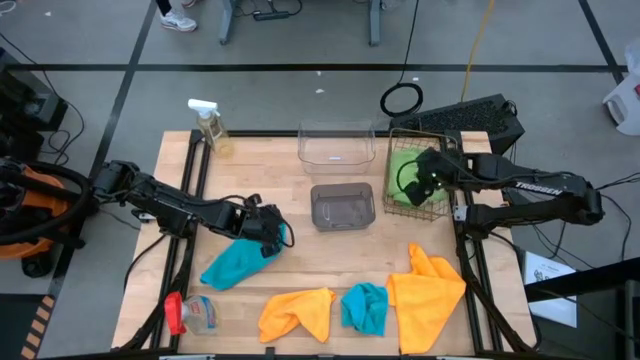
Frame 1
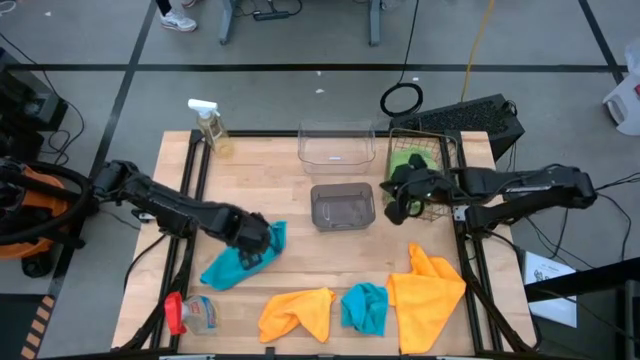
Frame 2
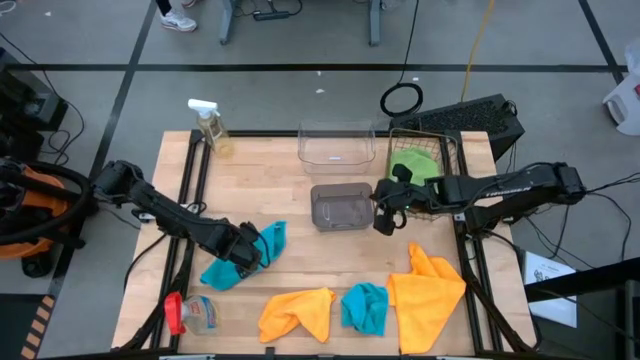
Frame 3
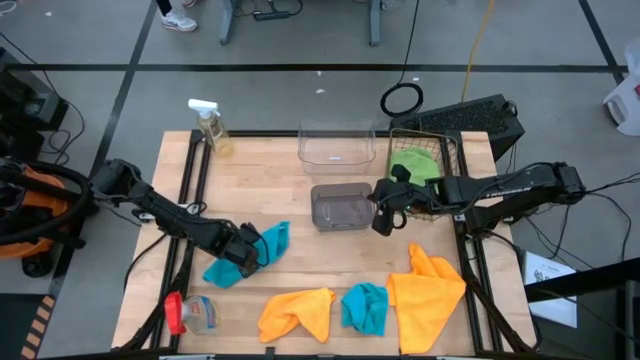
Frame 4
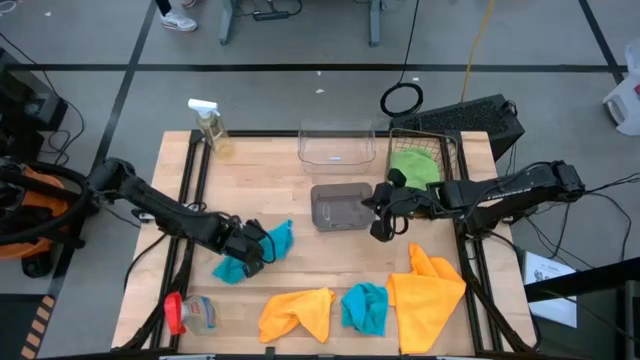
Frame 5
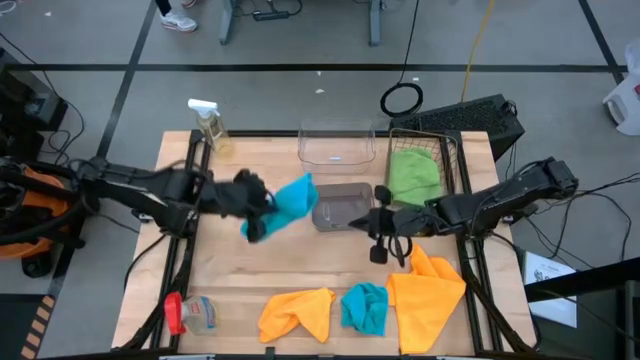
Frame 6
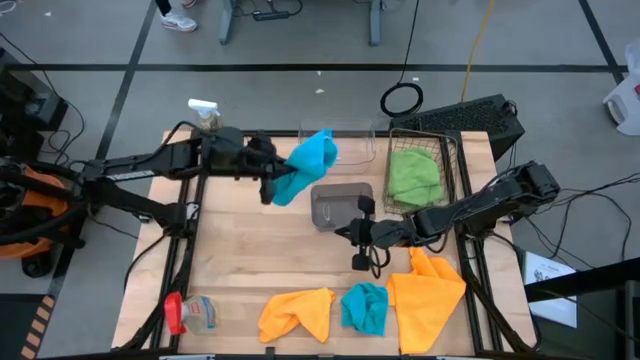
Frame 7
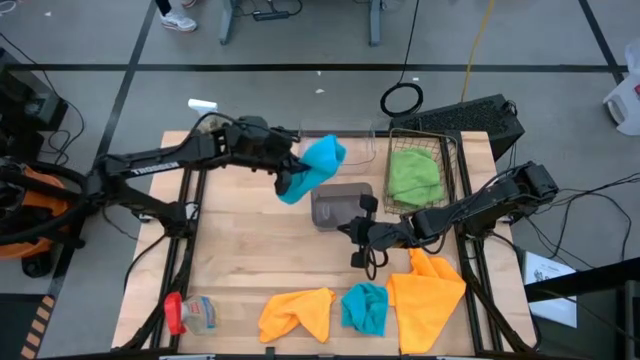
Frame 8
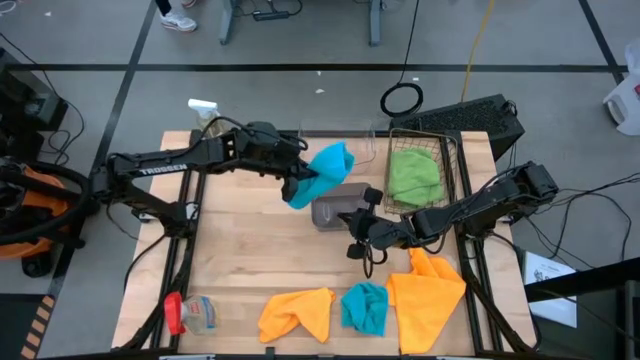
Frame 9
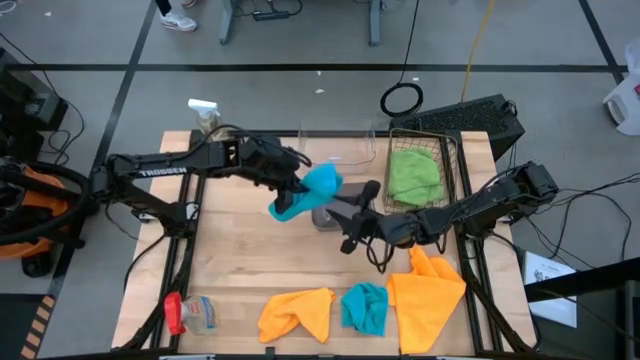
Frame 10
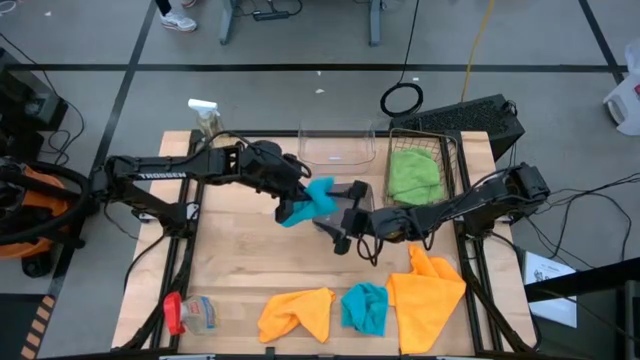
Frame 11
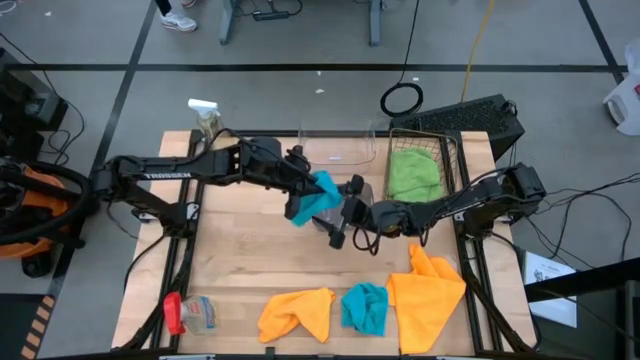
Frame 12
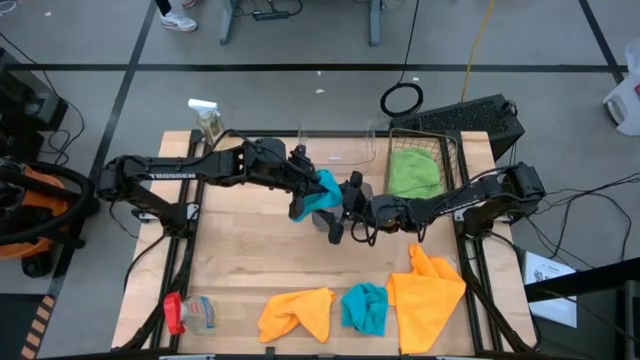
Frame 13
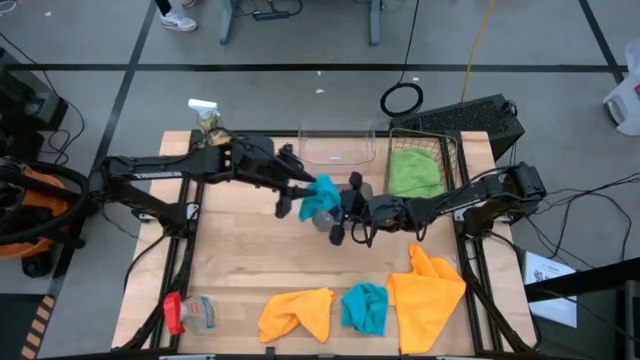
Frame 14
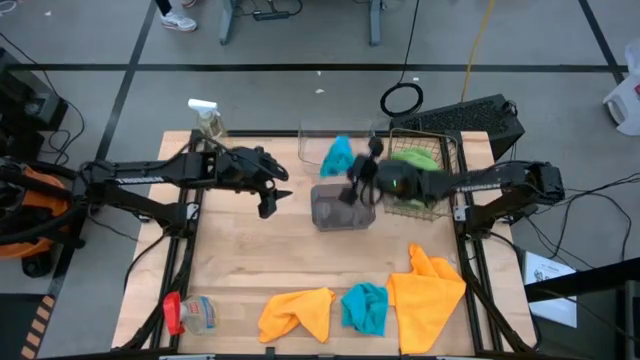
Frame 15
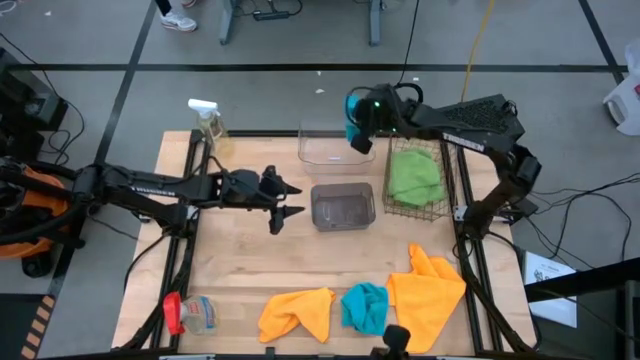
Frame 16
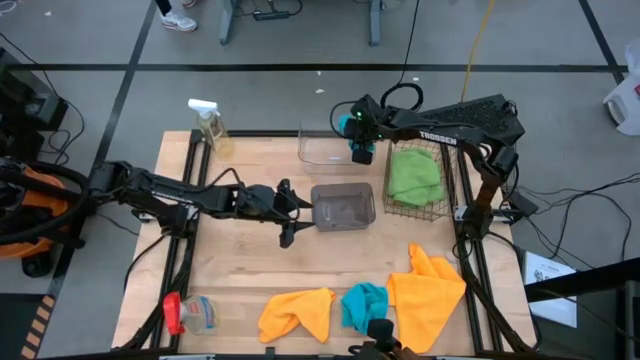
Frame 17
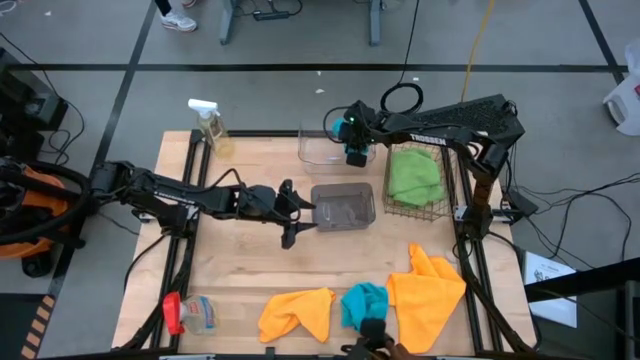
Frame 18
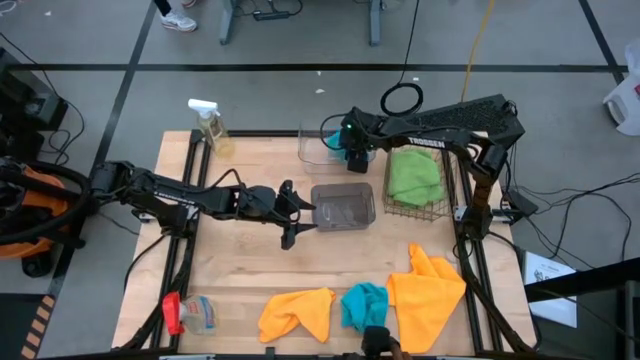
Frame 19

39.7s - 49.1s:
Task: Sort microfiber towel by color & place in baskets
Put the left blue microfiber towel into the transparent bin

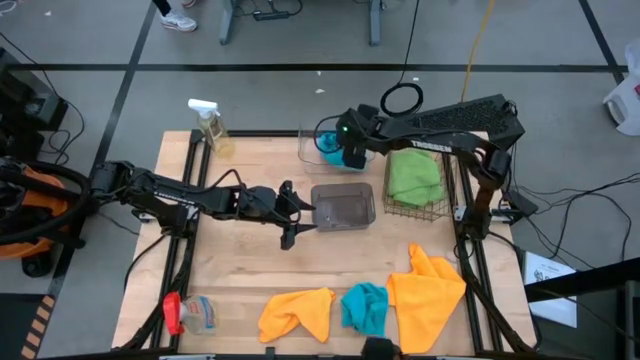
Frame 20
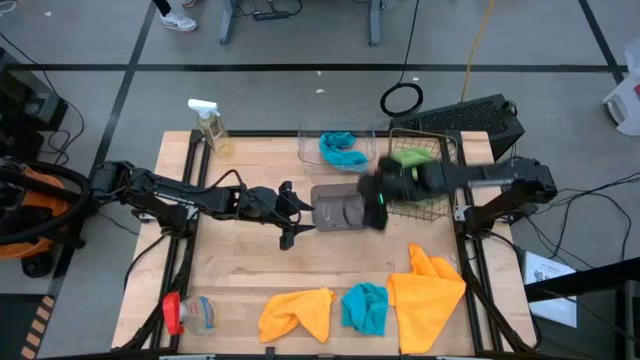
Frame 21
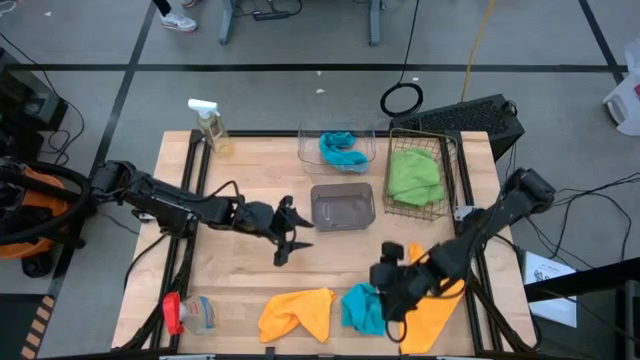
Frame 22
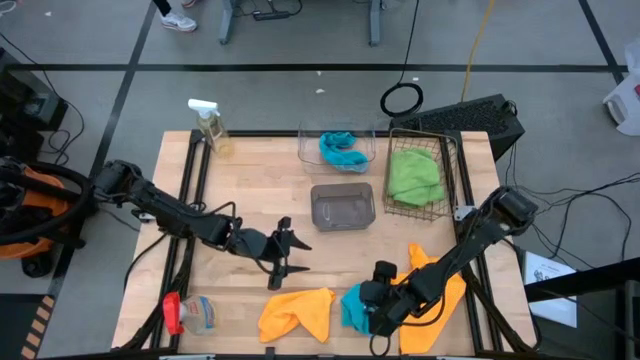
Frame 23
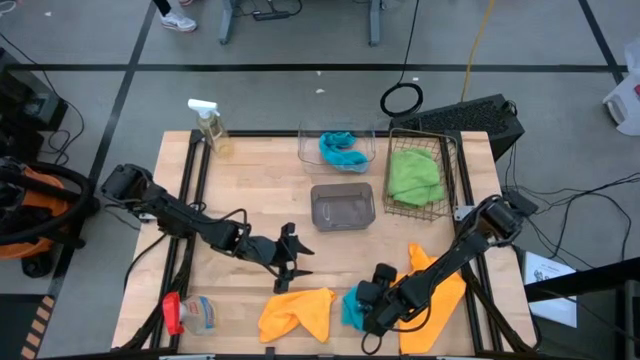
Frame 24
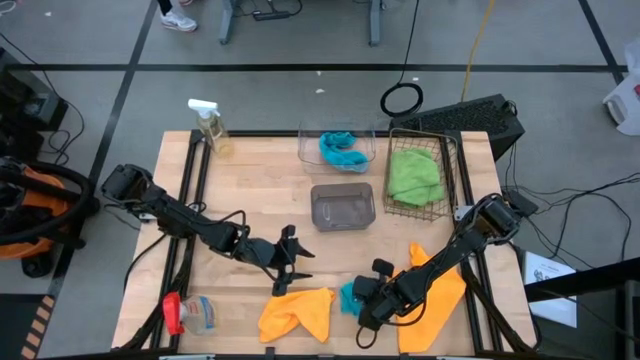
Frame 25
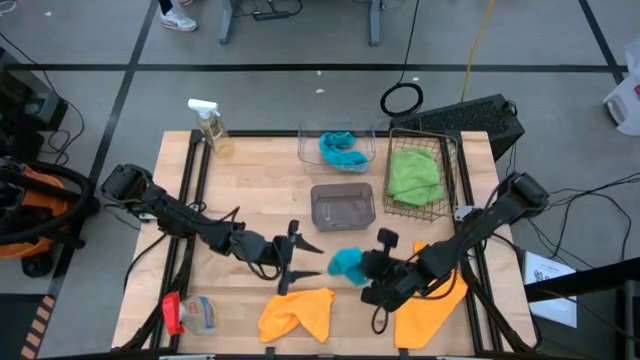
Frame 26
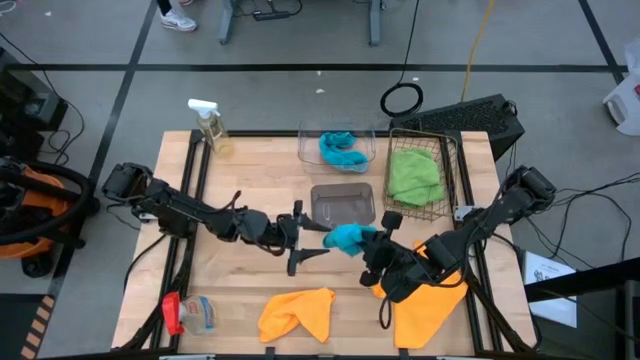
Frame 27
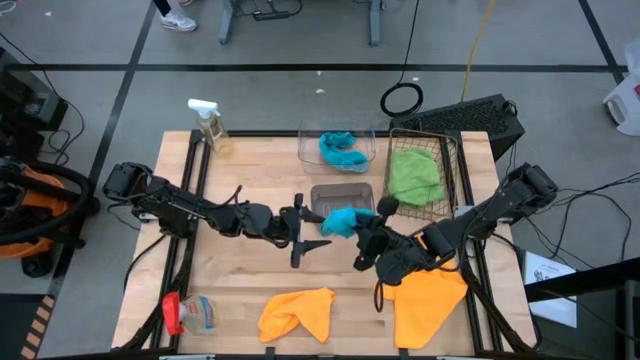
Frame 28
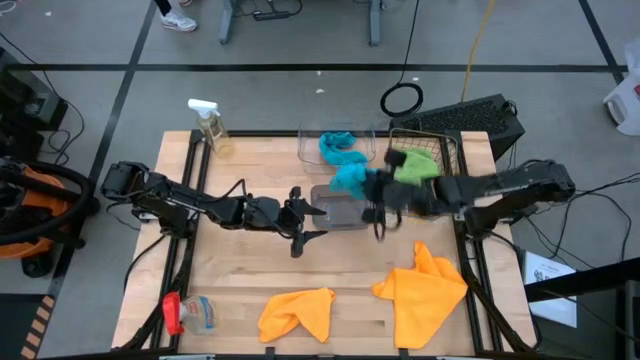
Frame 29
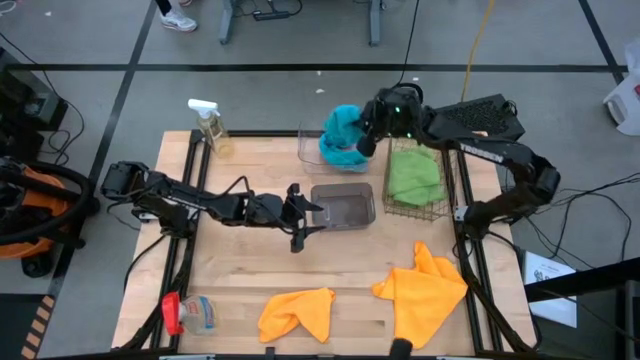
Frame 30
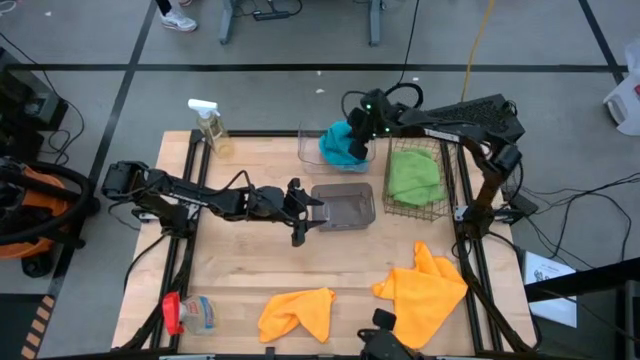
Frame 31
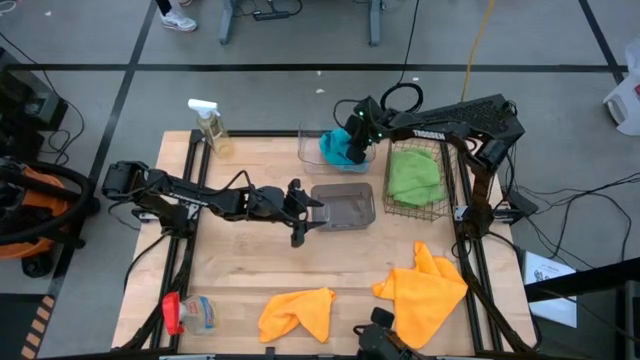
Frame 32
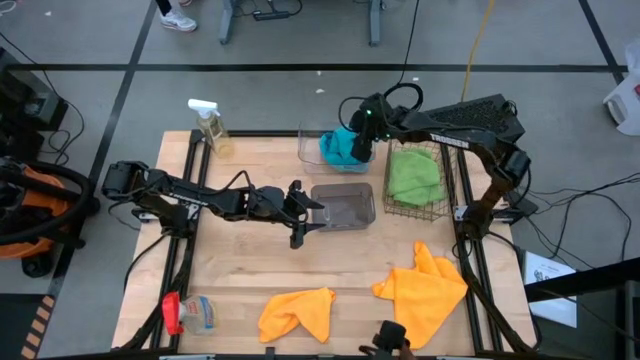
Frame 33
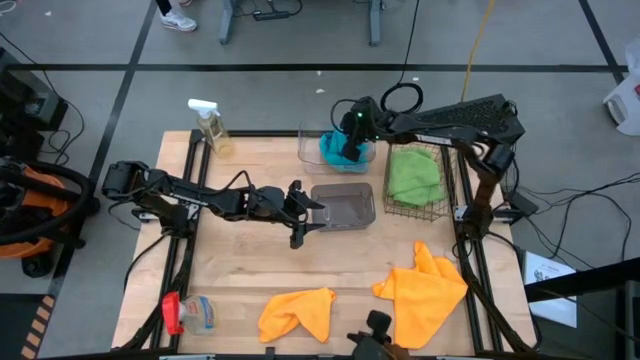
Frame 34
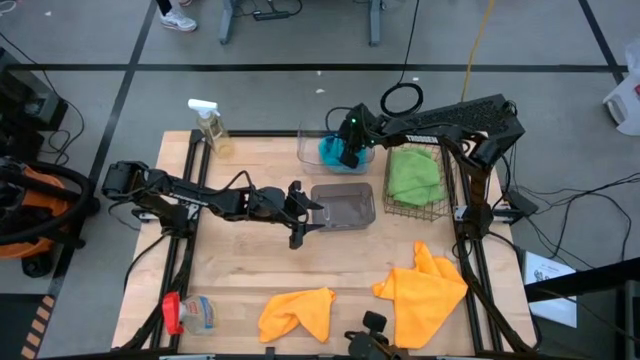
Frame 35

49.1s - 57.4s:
Put the blue microfiber towel into the transparent bin

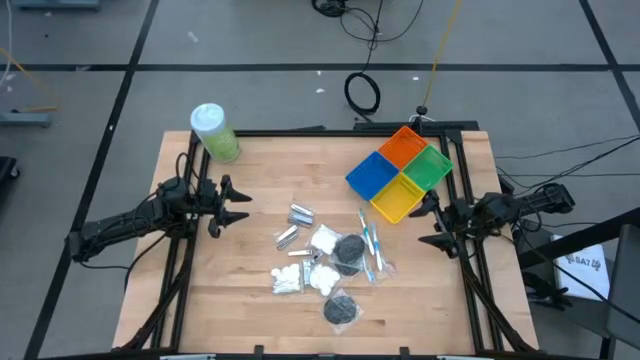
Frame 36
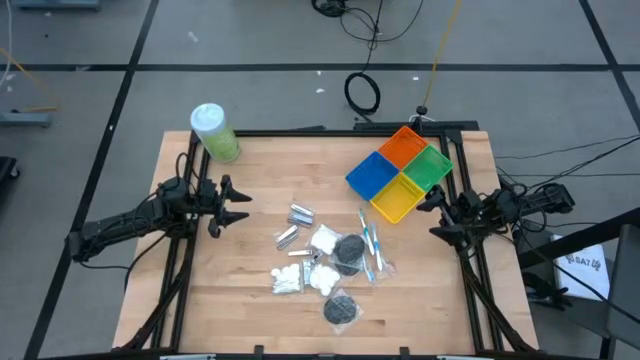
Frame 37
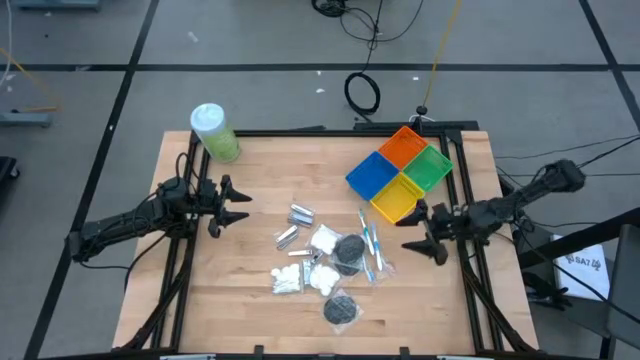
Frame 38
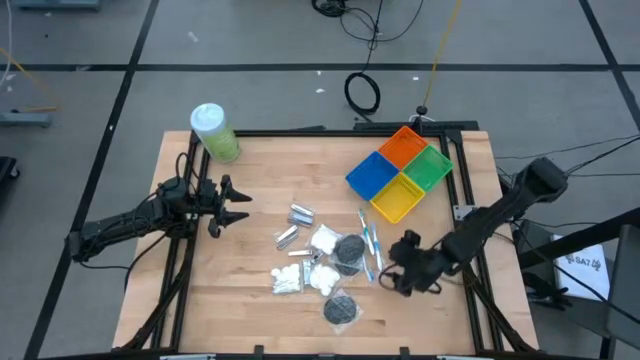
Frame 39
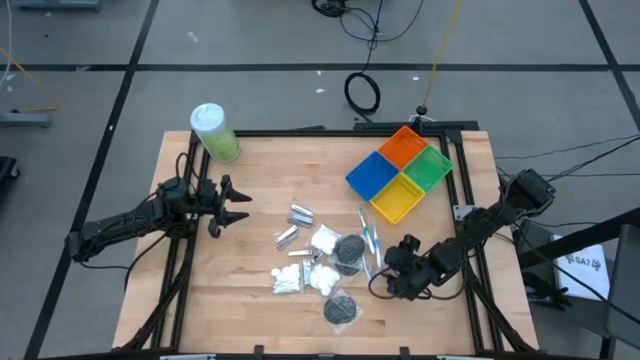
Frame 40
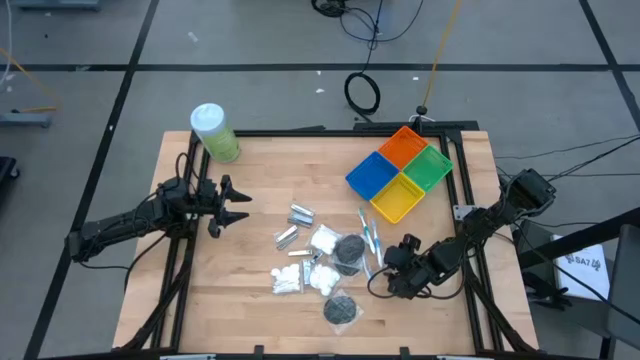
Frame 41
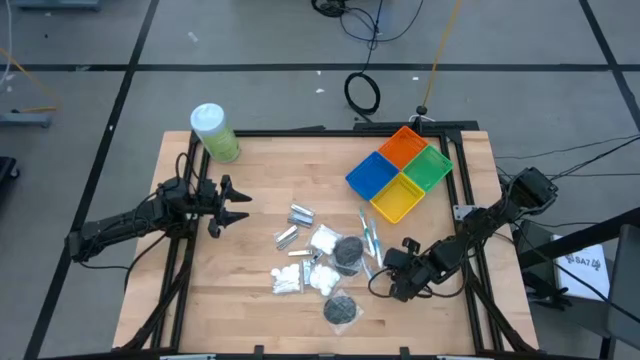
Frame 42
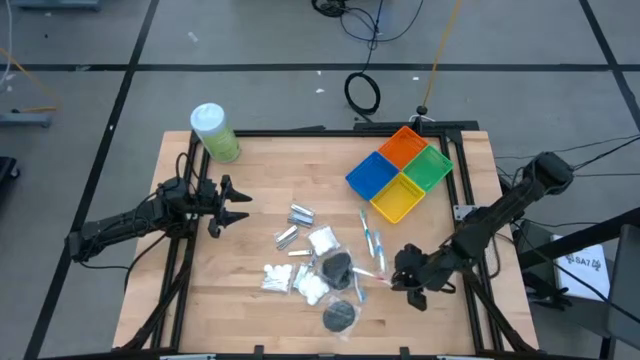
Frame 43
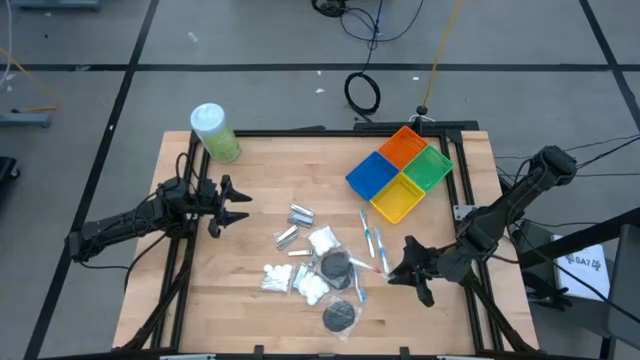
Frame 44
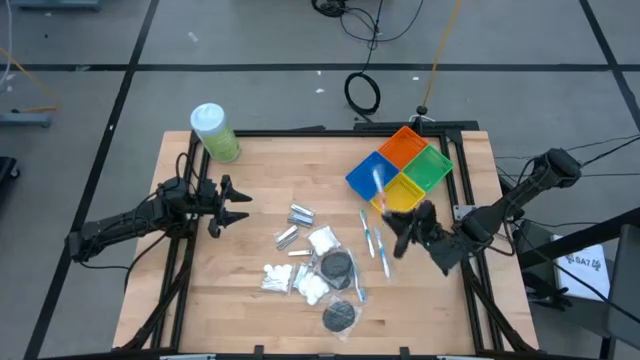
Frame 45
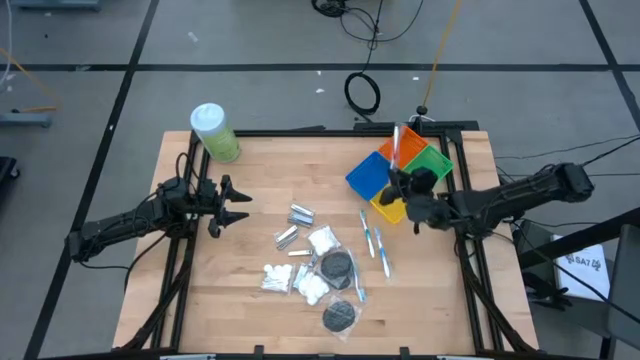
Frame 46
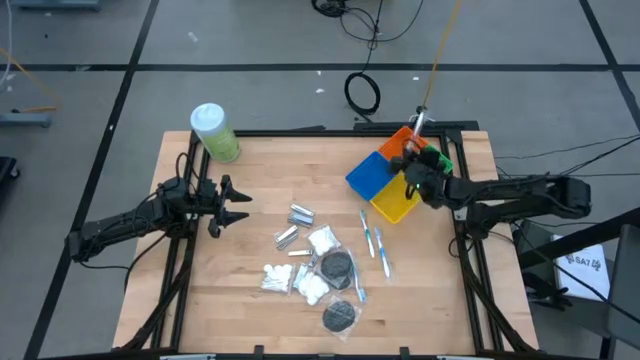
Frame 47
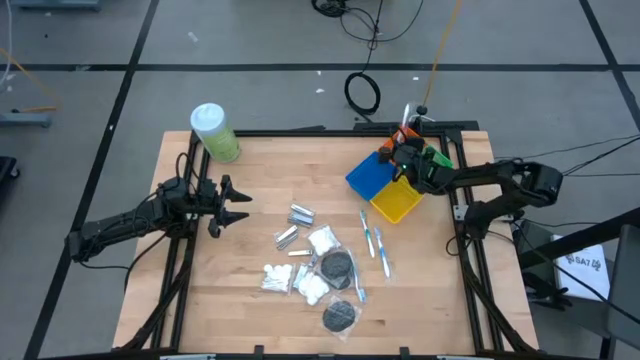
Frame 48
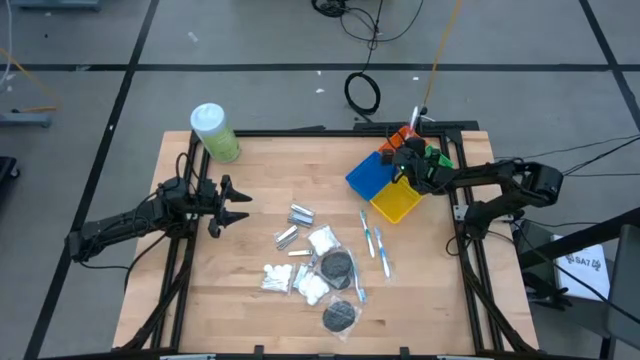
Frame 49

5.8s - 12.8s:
Task: Pick & Place Travel size toiletries
Put the red toothbrush into the orange bin
